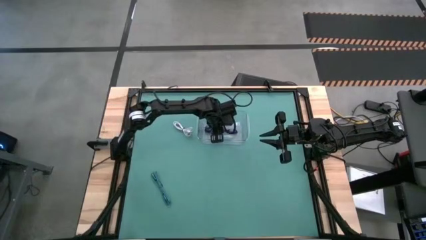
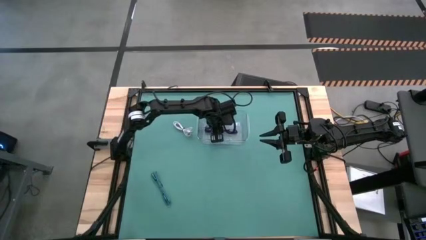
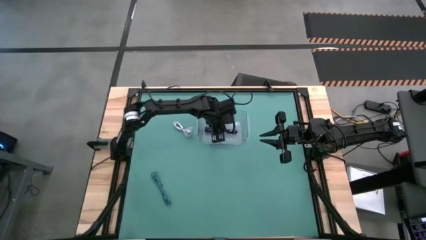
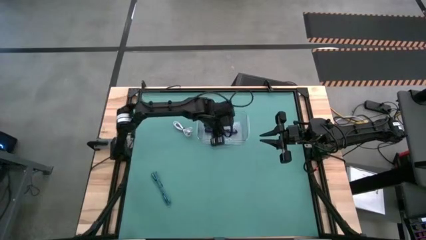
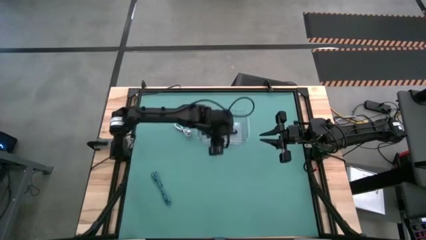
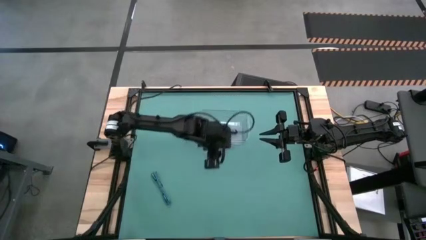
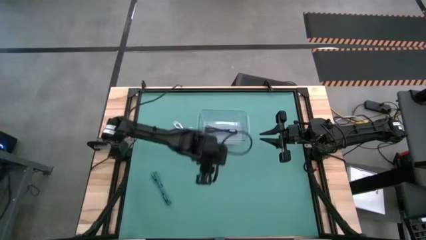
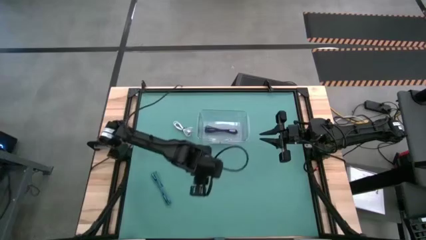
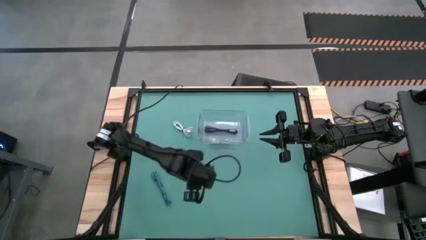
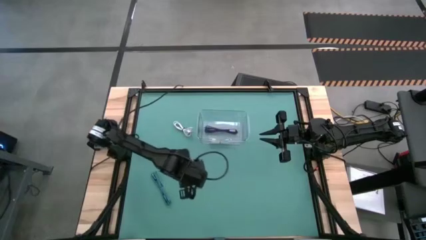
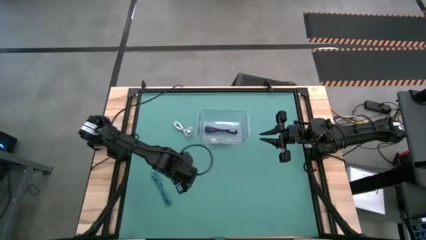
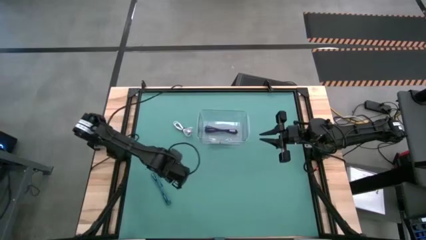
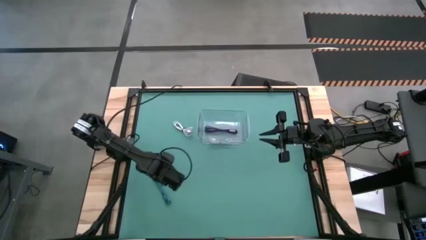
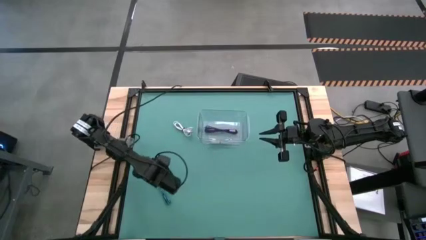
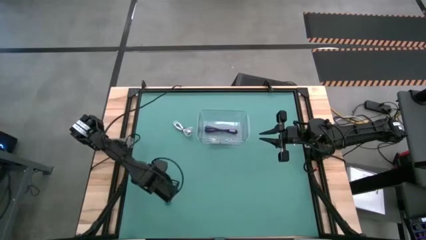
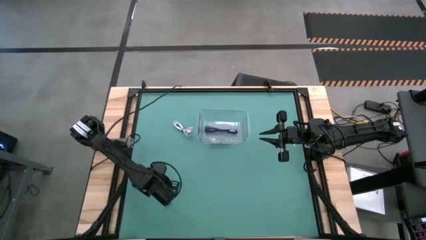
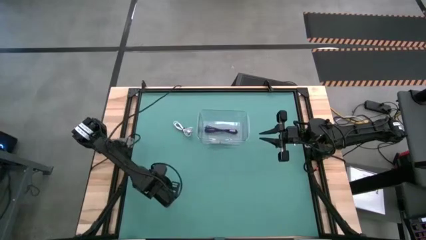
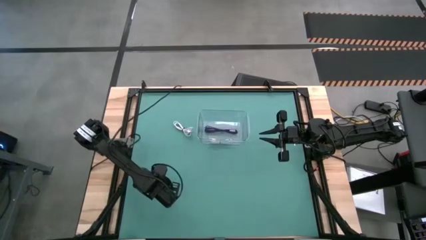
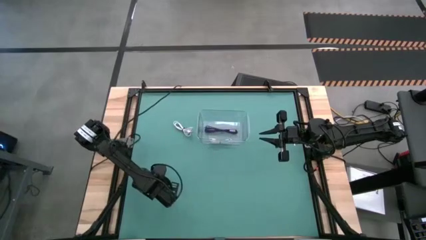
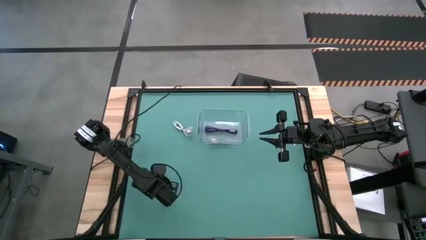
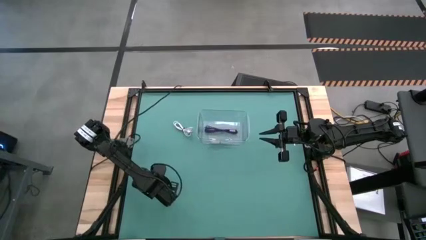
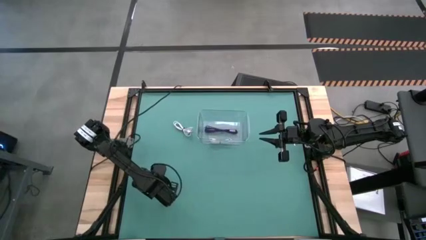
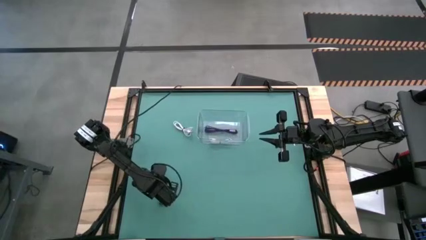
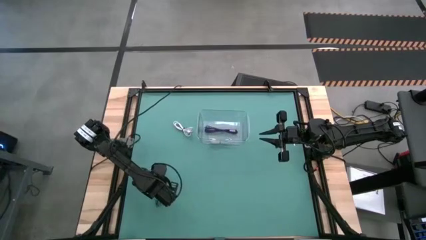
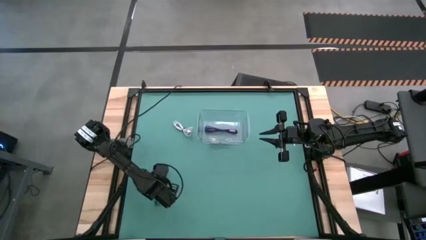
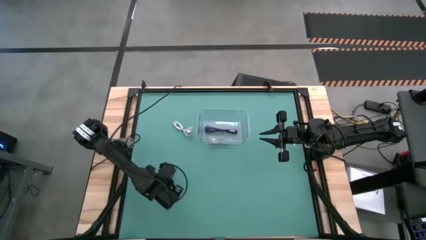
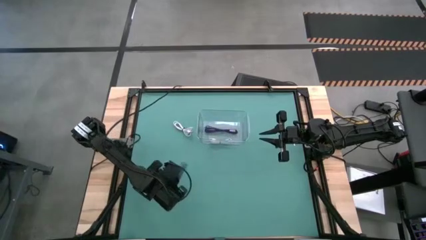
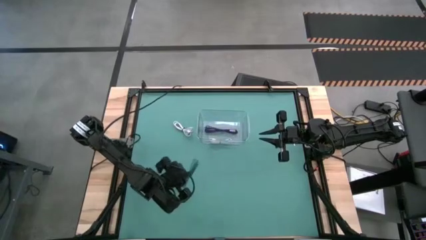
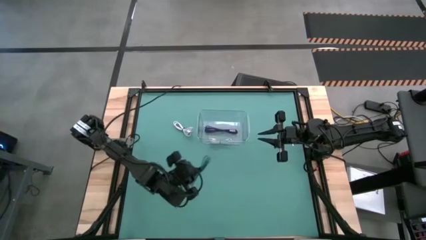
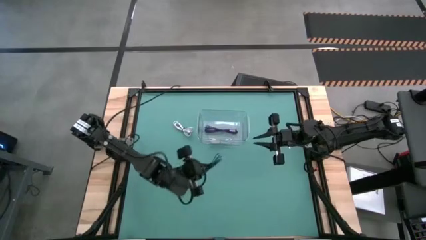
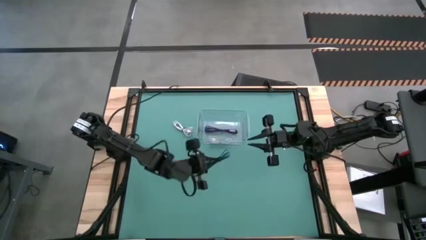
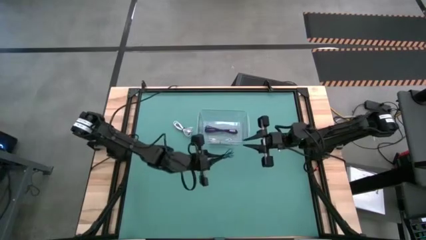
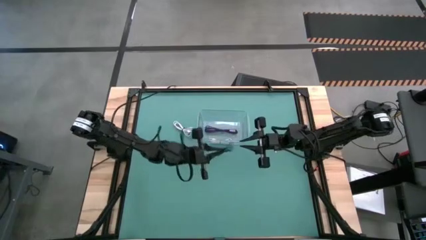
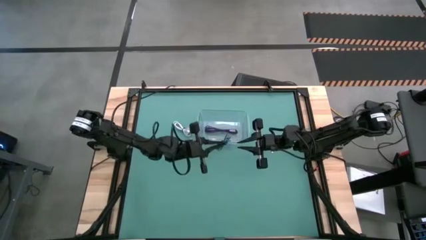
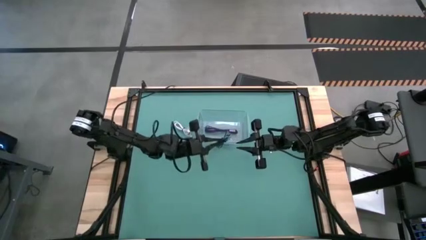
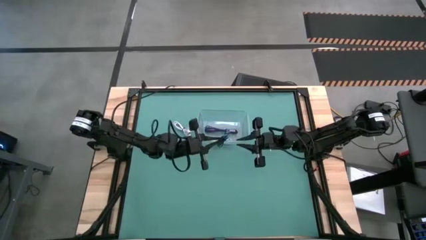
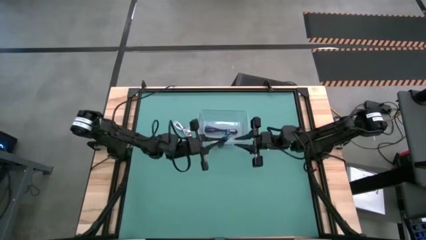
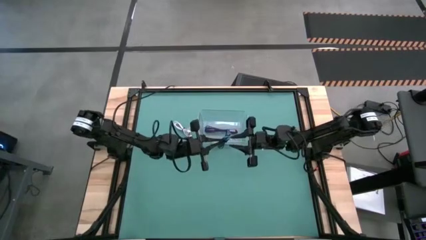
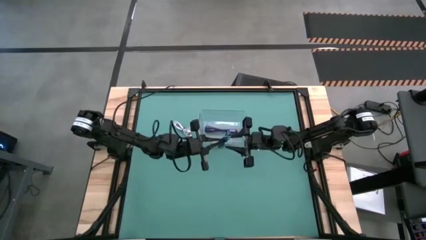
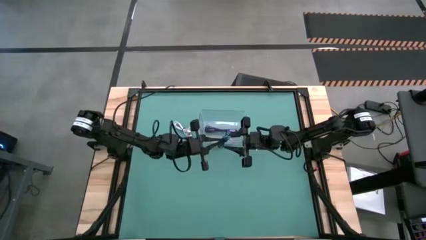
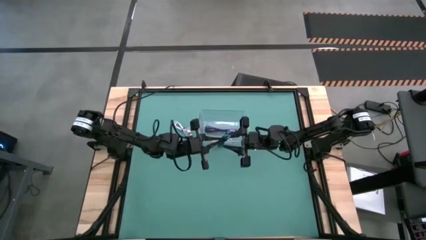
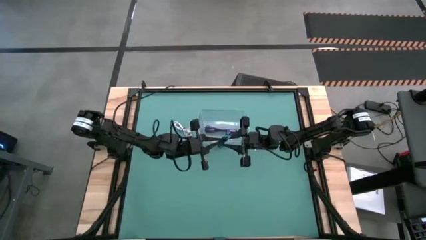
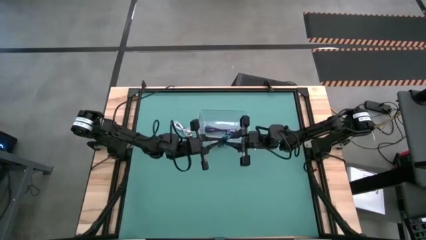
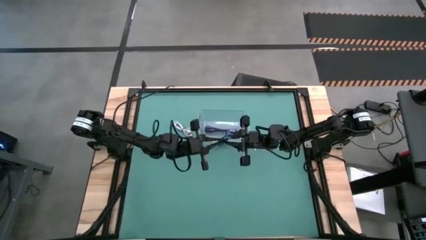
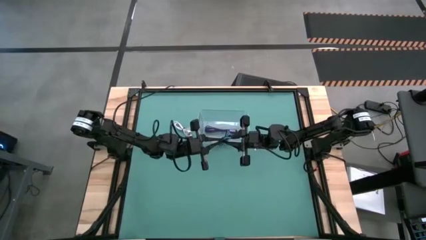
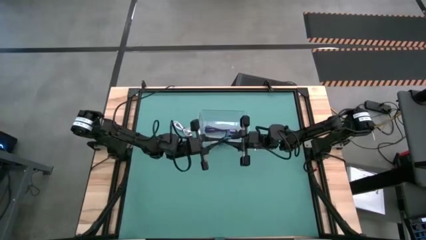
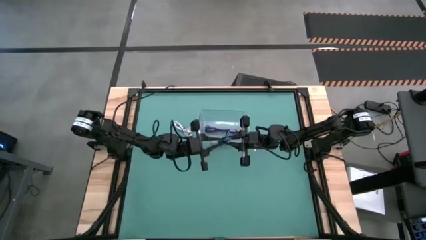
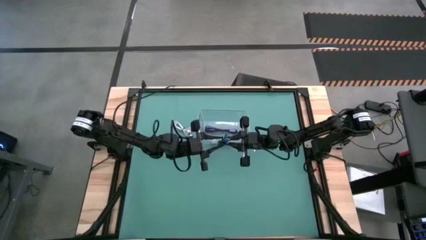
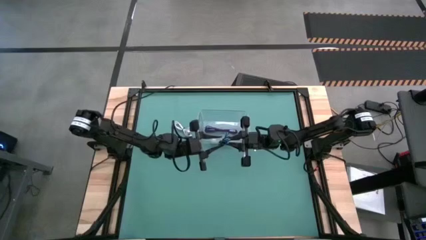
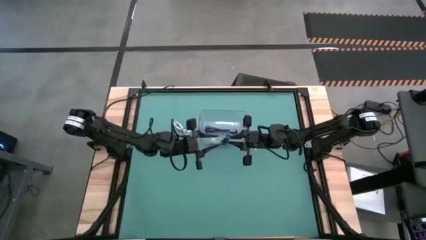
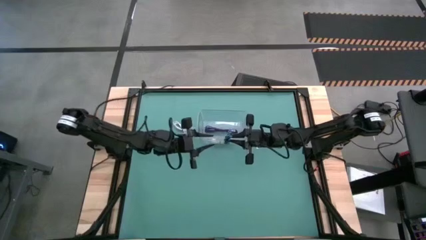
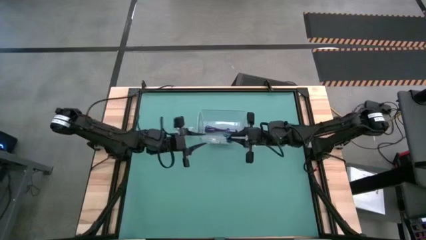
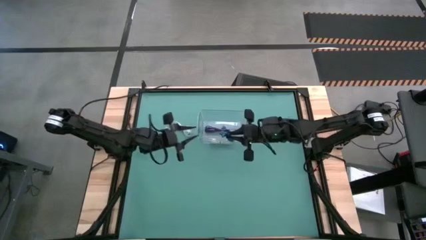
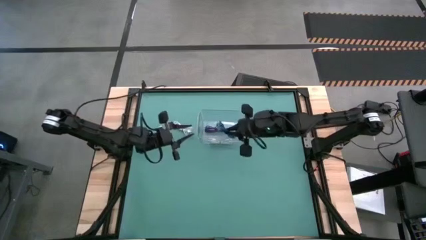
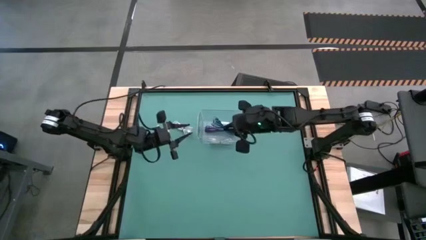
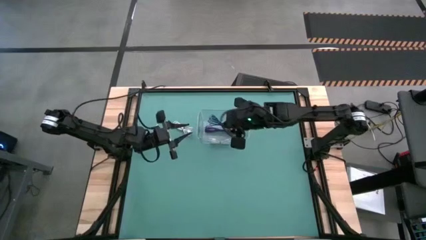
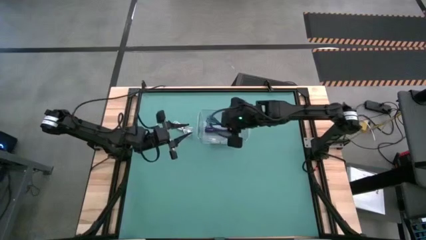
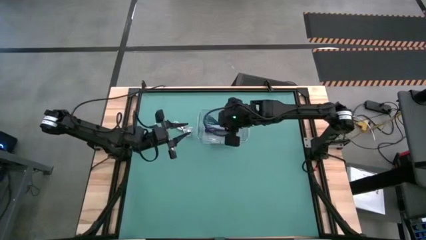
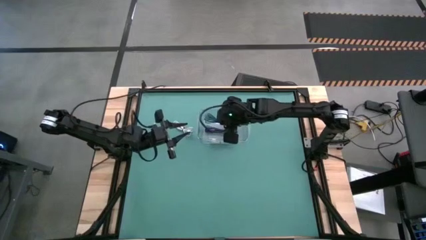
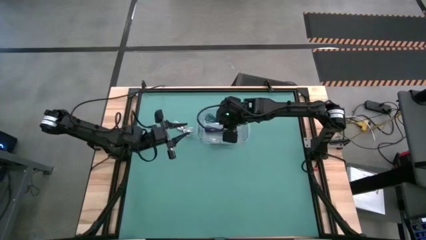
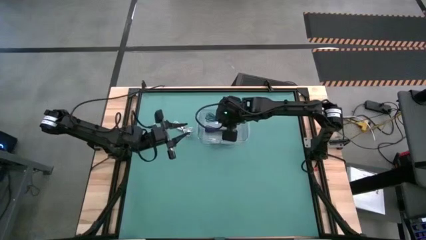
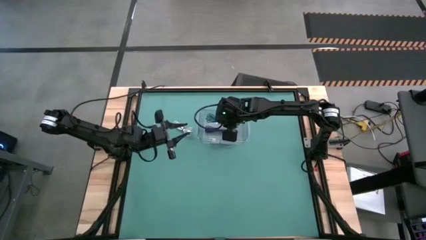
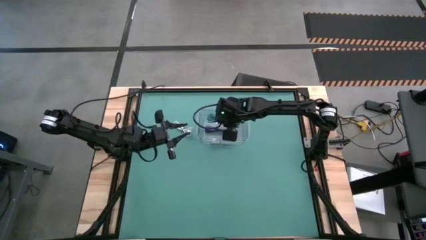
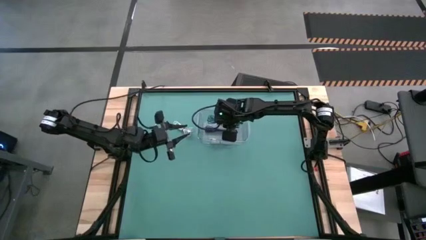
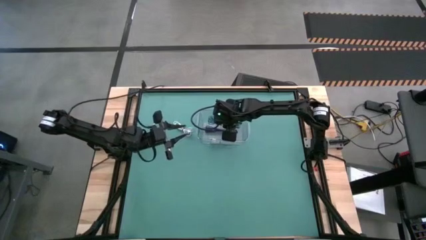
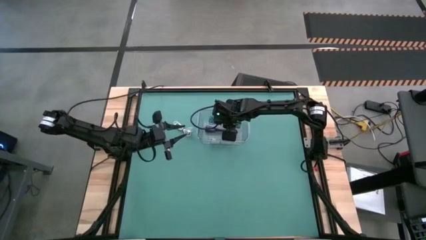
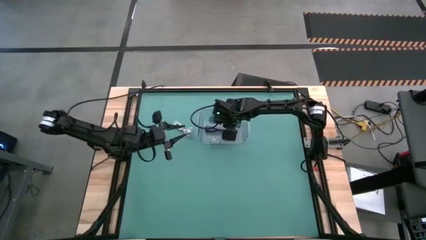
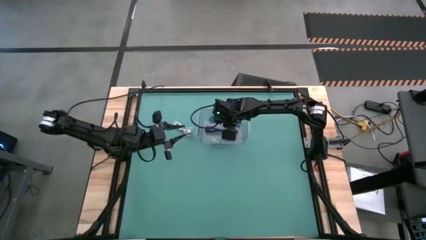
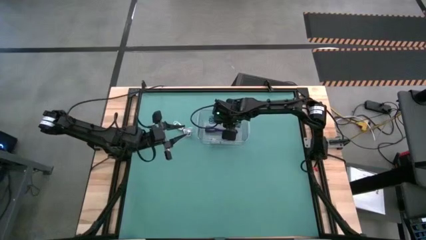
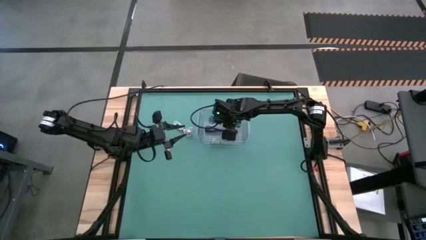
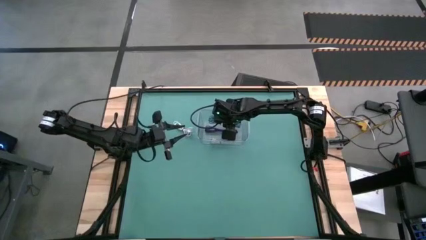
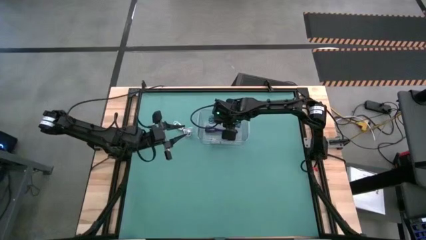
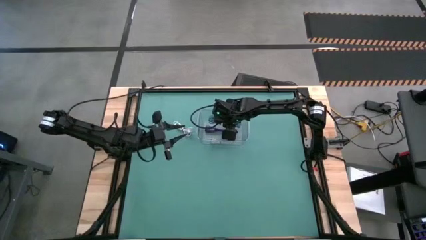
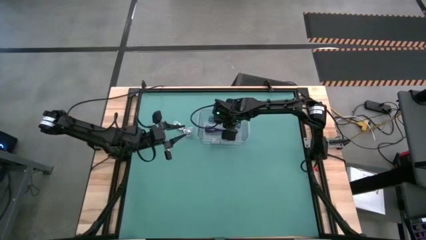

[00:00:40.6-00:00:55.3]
Task: Pick and place USB-C Cables
Put the blue charger cable into the transparent container

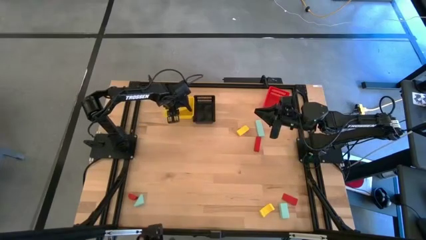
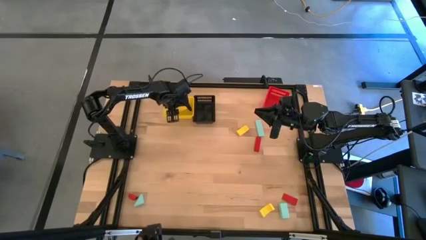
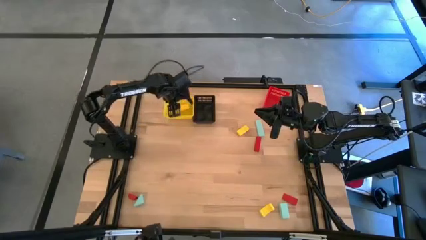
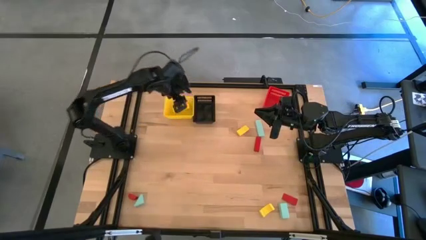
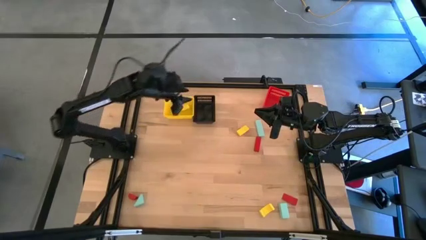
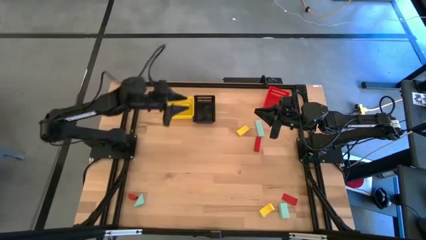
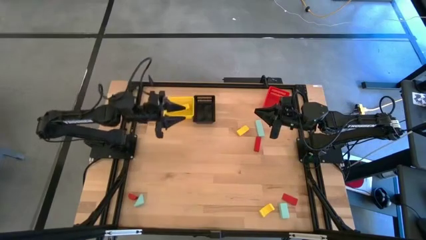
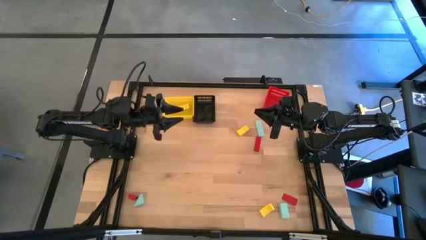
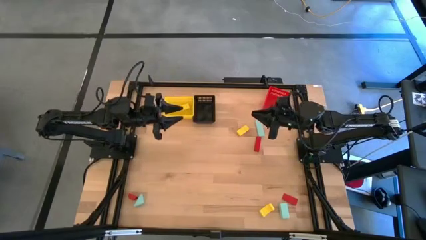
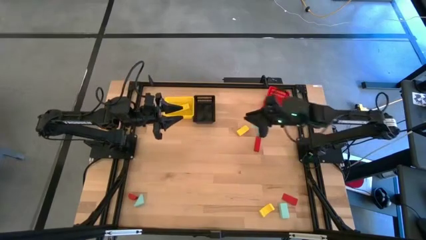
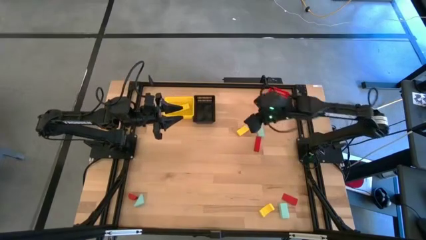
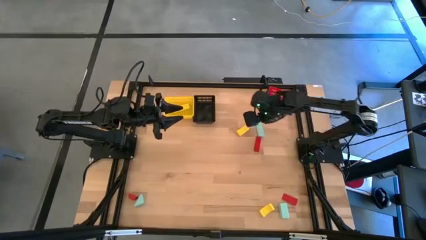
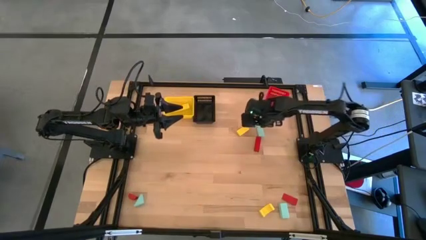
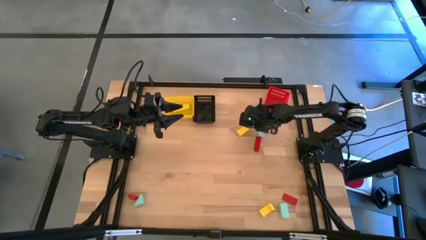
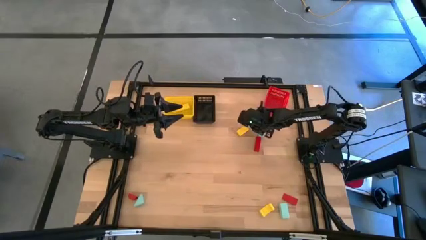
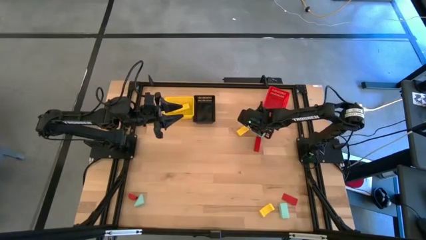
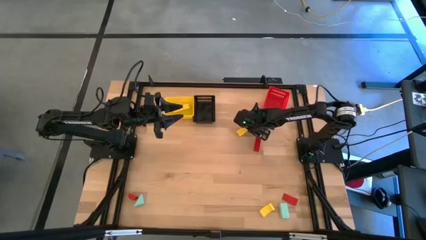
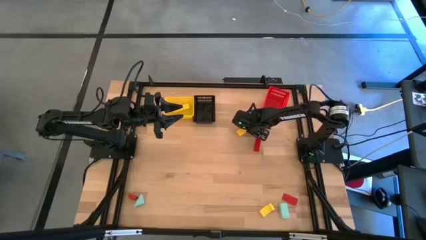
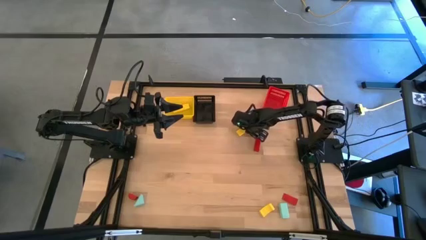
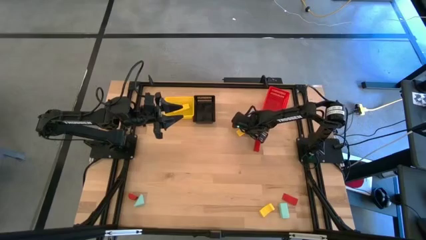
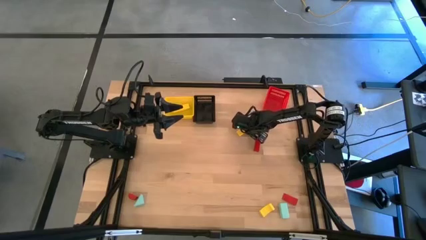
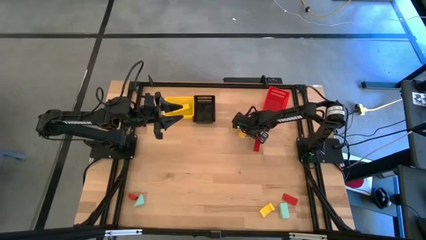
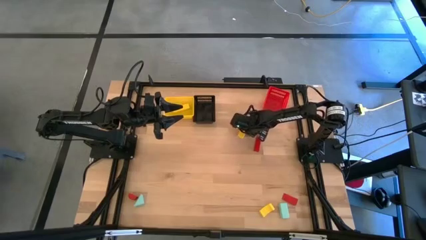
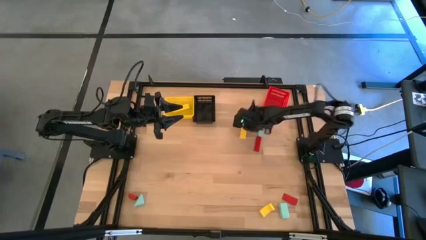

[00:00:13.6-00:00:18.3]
Task: Sort & place blocks by color
Put the top yellow block into the yellow bin
